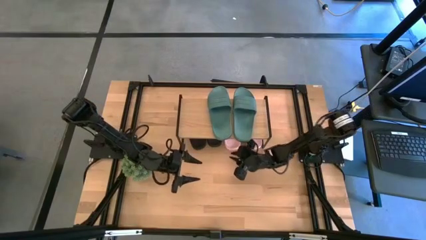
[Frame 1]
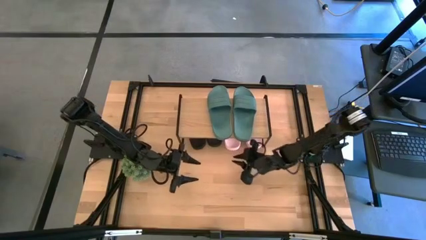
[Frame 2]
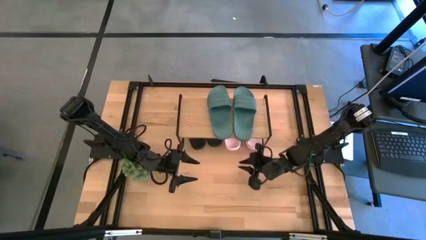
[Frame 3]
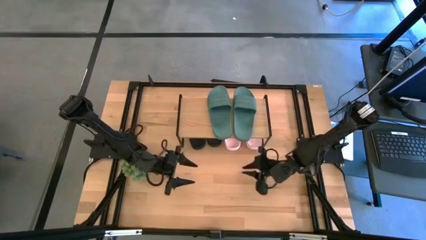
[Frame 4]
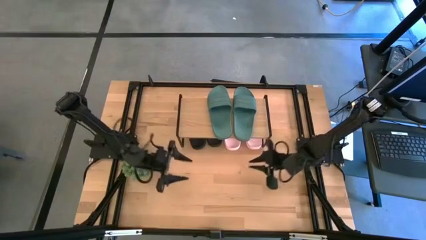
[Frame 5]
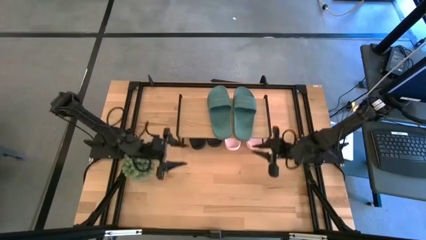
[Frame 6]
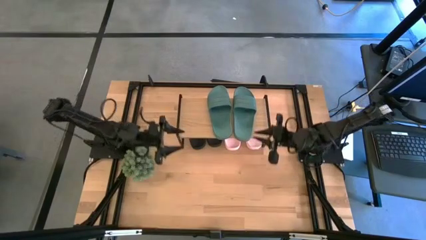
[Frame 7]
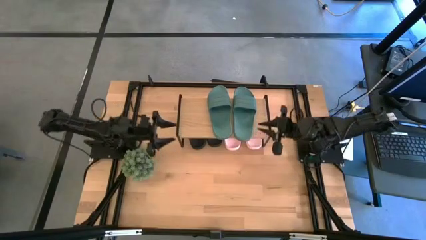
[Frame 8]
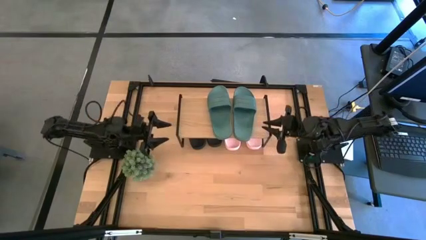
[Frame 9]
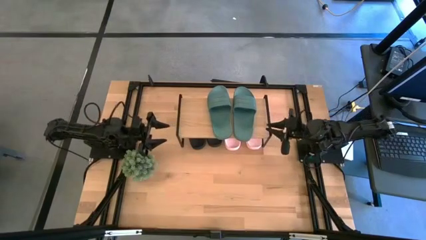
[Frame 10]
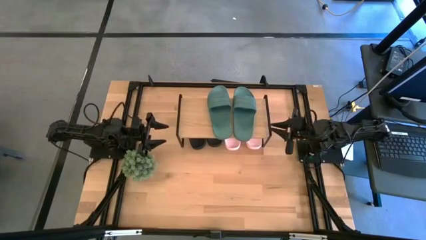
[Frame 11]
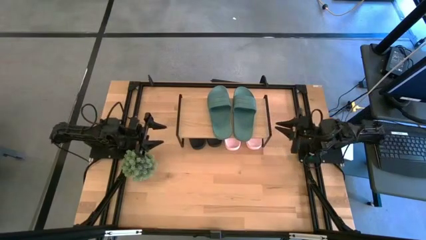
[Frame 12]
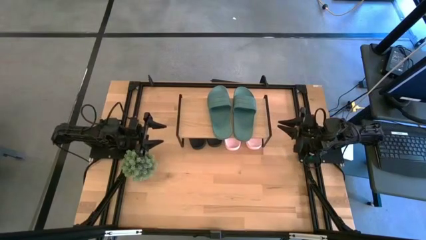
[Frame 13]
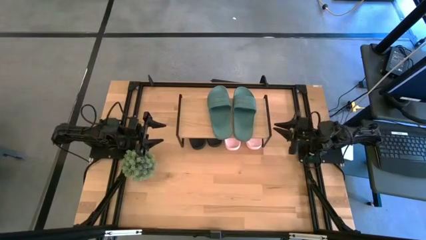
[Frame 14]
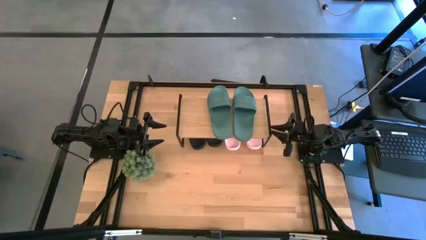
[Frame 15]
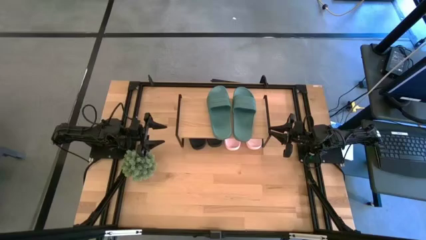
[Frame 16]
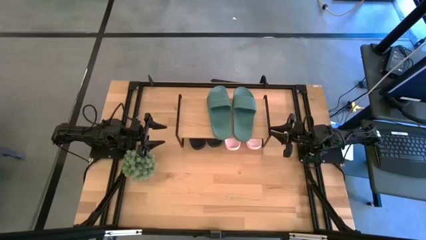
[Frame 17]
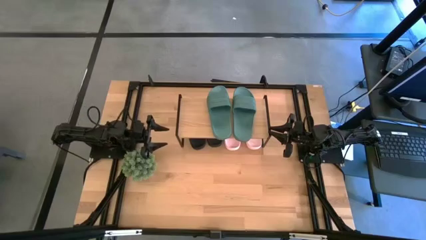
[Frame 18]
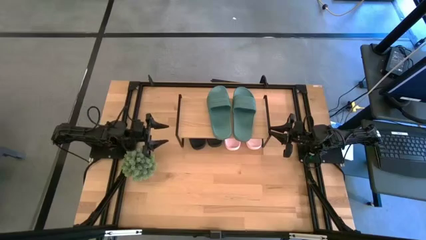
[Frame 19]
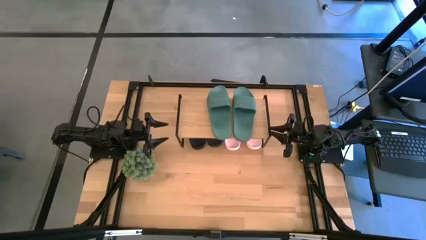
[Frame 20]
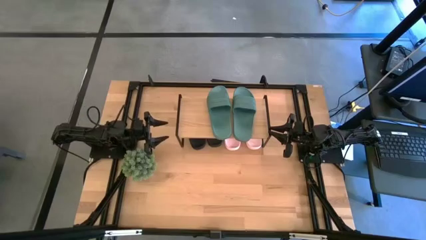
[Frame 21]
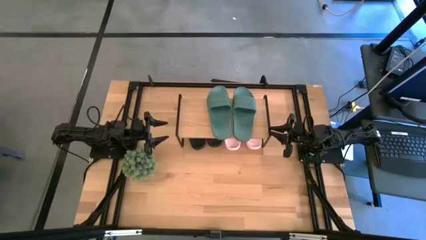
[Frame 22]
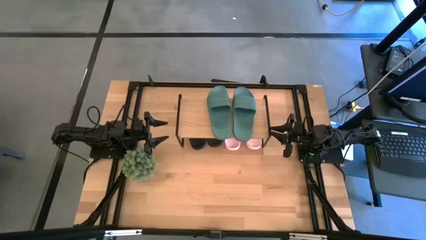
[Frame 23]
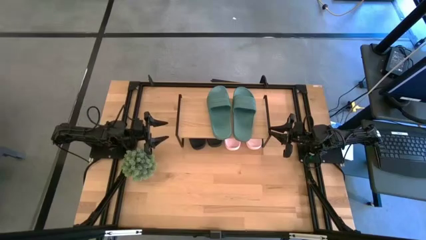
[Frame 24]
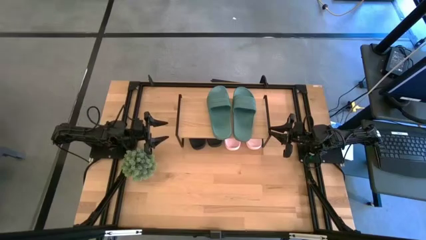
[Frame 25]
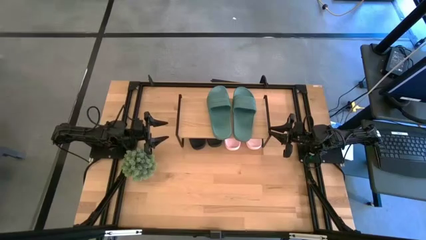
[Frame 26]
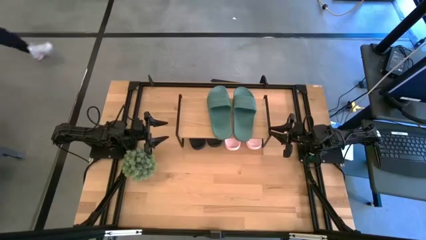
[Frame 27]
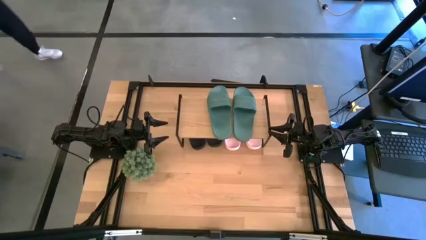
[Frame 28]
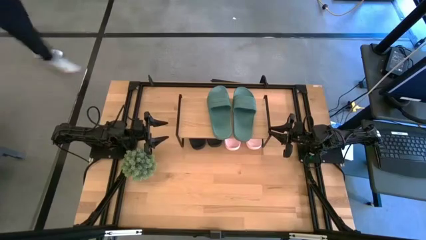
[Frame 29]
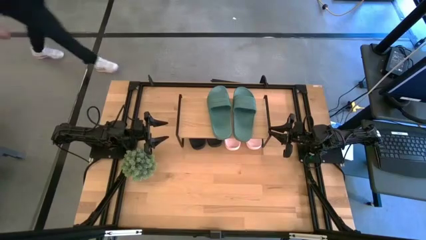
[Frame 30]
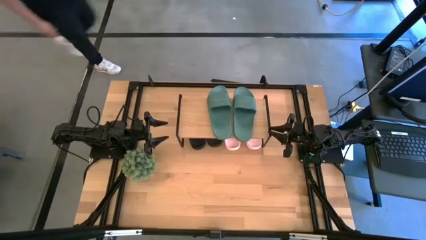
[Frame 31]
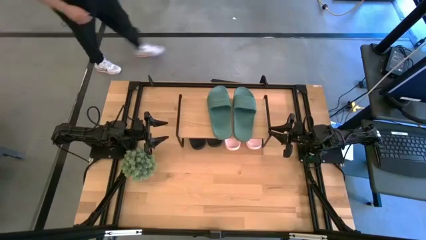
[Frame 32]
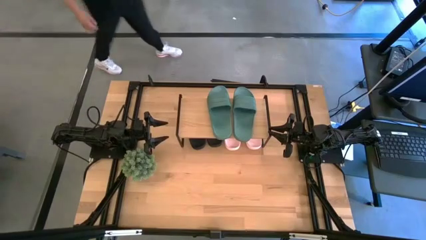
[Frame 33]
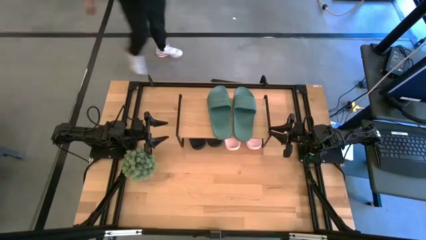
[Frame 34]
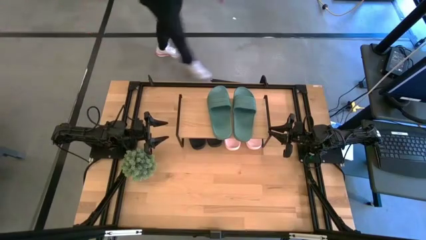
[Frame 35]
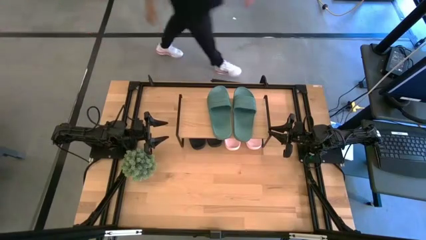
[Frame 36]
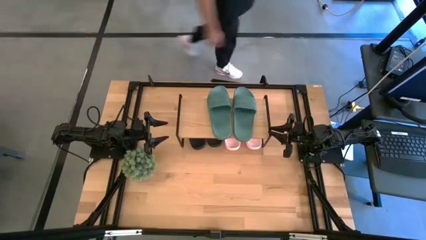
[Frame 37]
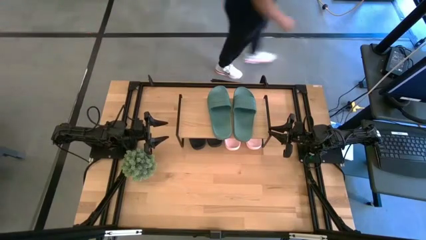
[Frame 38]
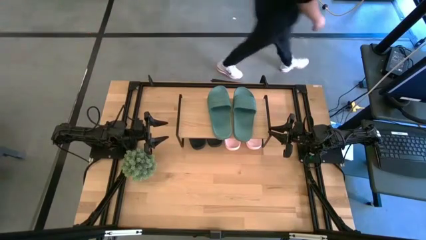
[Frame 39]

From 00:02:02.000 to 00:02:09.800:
Task: Pick and place slides into the shelf
Return to Home Position

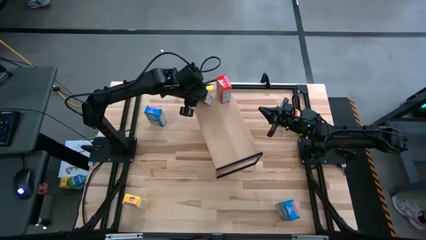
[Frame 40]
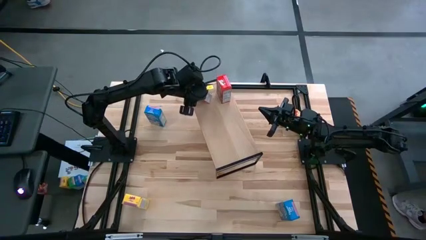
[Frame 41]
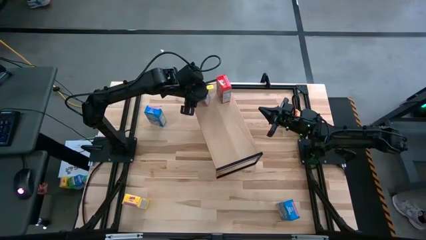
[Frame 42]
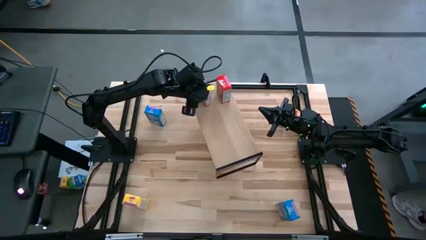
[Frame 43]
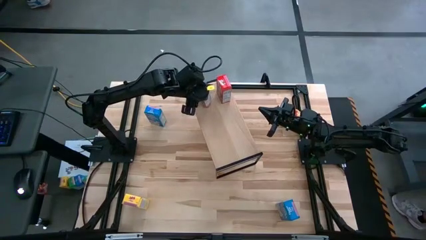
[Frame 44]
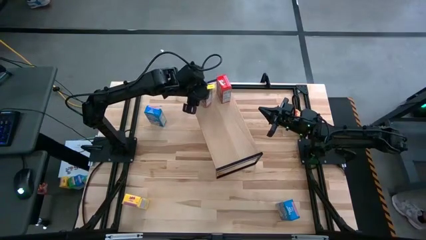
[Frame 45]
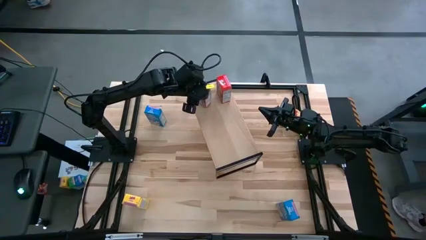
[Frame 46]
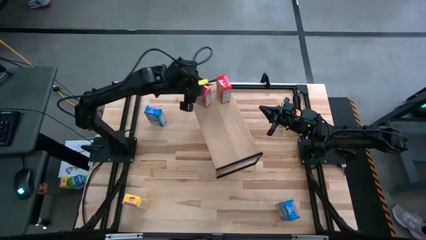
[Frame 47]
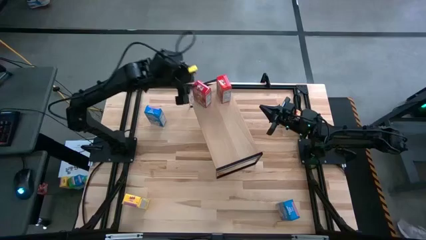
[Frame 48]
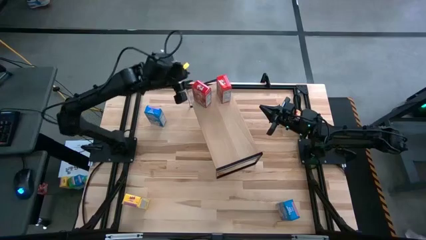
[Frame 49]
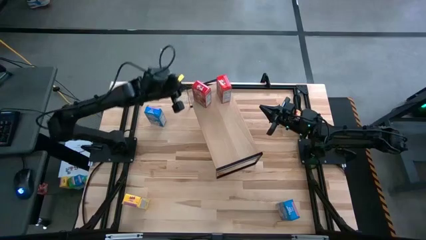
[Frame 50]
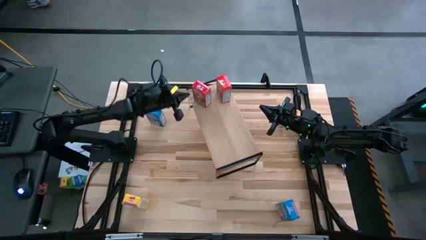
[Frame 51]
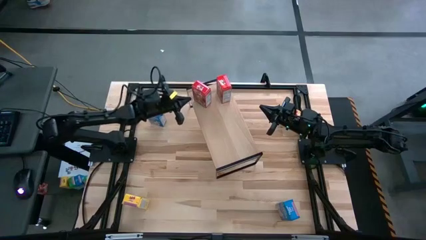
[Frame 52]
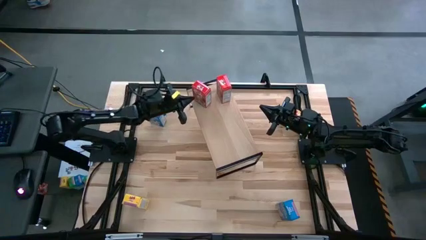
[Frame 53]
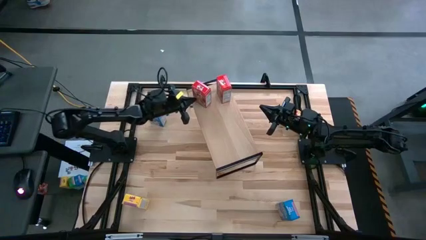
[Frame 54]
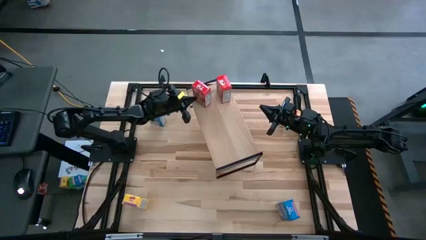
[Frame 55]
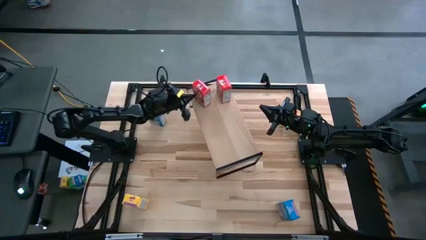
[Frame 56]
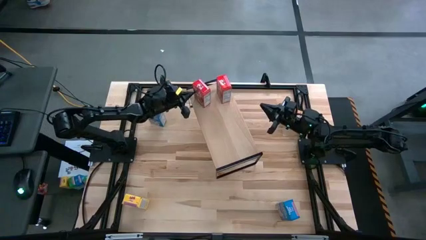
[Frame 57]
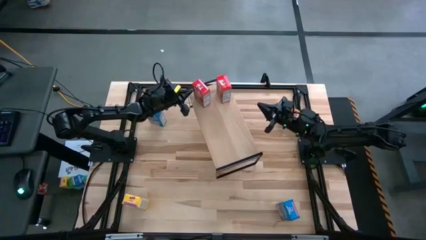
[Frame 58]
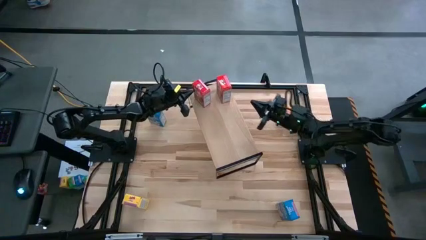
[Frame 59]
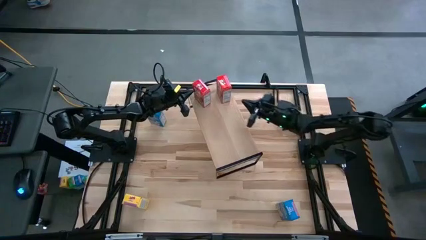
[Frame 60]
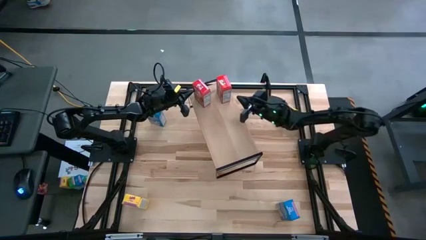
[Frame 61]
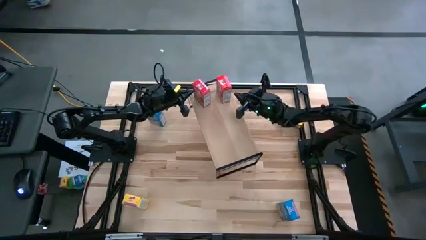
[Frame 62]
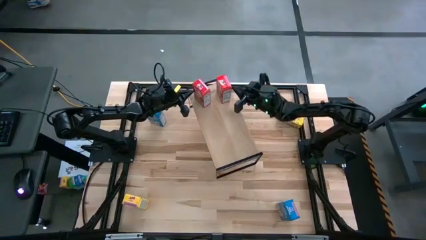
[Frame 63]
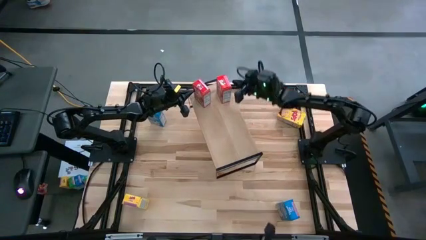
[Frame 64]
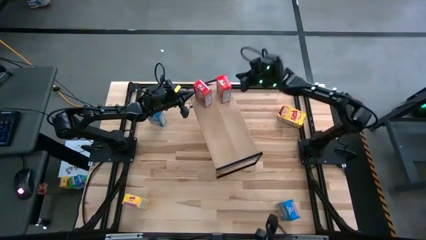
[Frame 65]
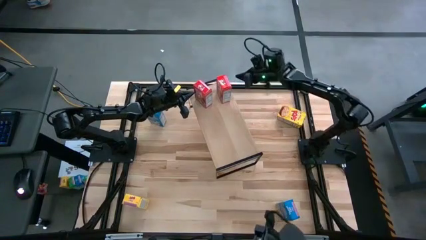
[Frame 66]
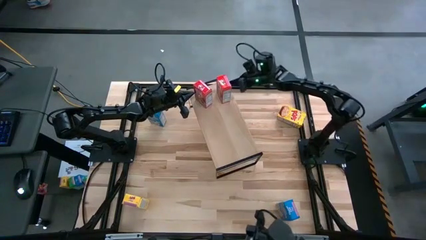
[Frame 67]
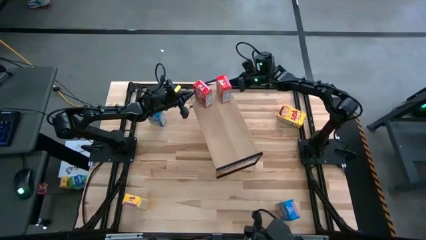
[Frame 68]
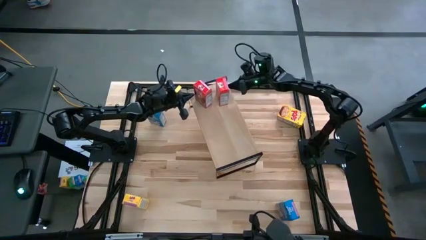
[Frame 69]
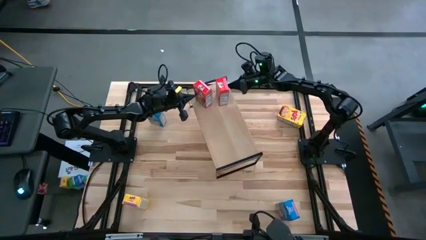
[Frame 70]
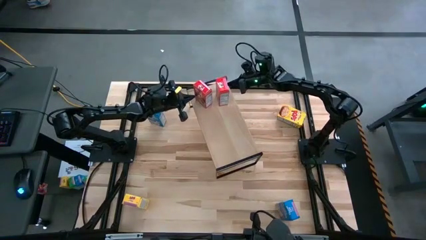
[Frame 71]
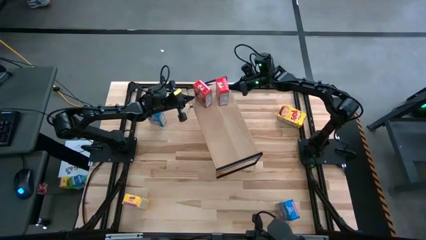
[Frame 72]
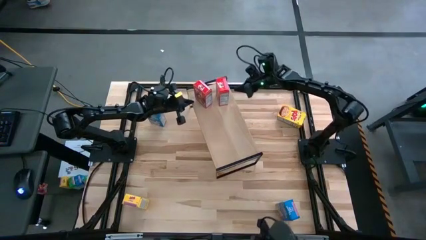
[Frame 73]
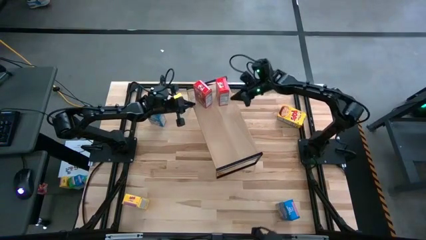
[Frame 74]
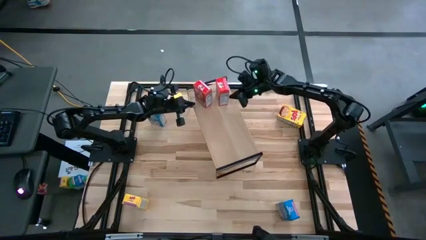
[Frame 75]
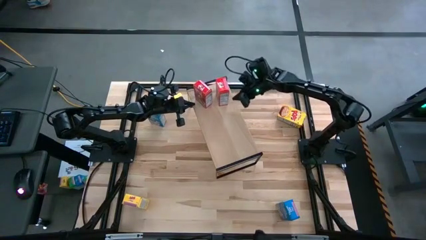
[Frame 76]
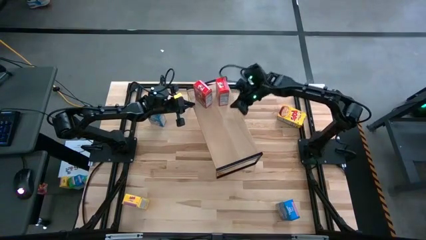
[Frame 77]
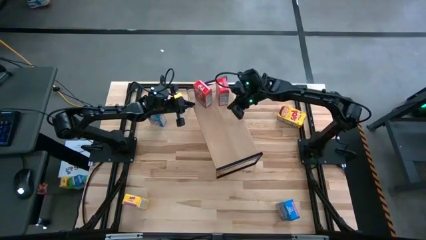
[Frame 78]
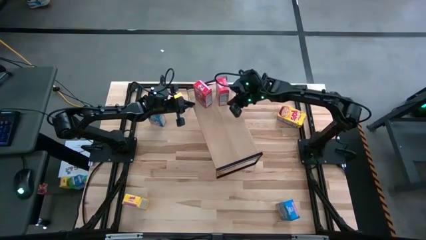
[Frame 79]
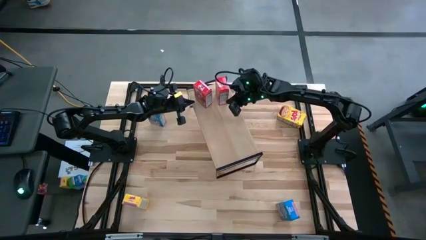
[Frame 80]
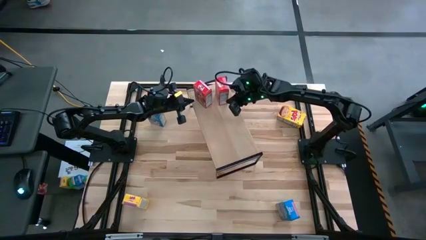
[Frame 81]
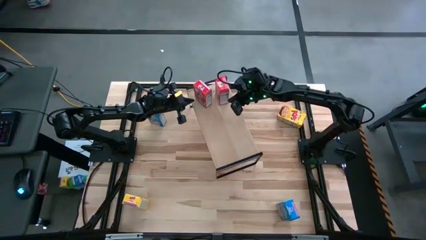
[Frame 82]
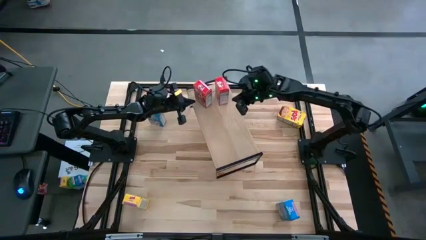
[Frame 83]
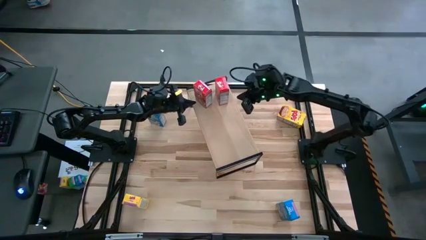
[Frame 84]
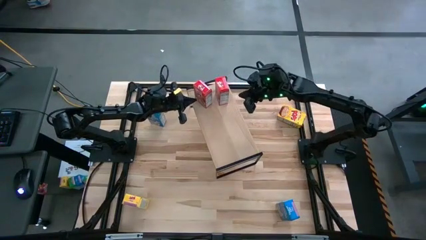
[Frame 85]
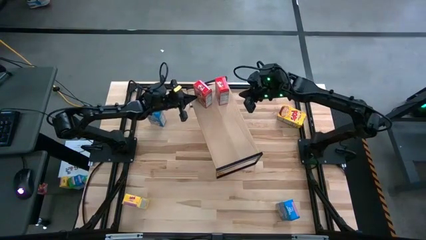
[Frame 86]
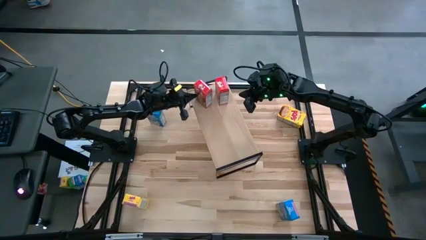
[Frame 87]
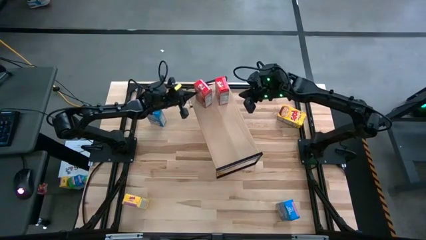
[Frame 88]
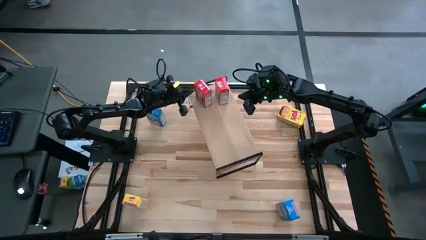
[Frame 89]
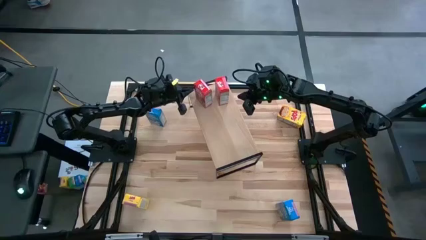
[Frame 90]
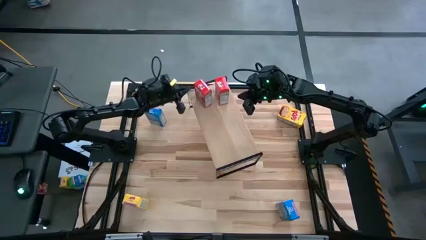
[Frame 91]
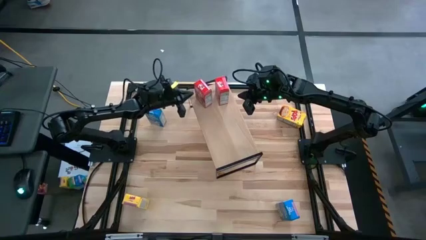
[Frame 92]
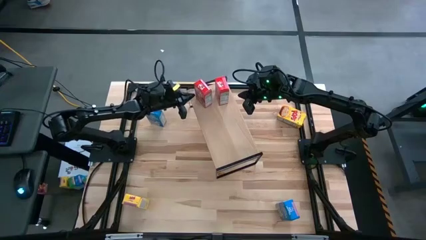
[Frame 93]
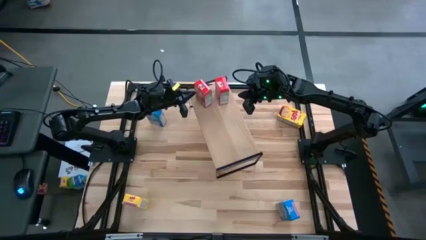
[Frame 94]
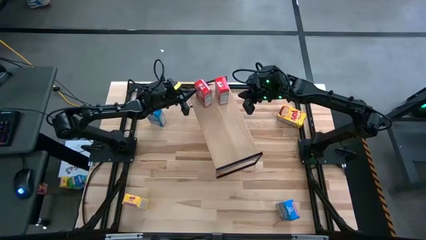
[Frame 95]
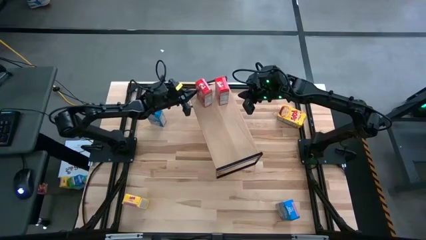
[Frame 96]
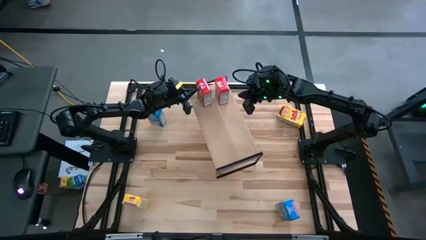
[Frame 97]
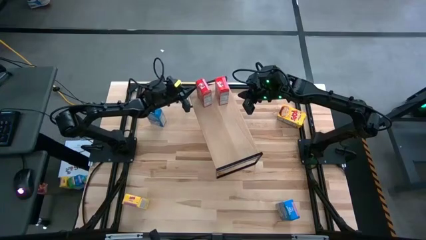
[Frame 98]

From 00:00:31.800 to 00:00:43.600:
Task: Stack cereal on shelf
Put the red cereal box aligned with the other red cereal box on the shelf
